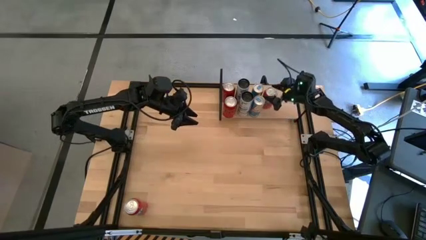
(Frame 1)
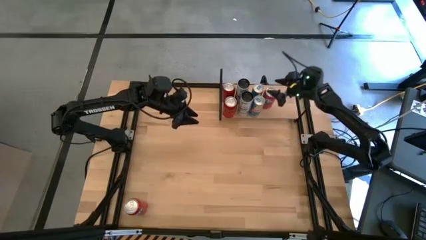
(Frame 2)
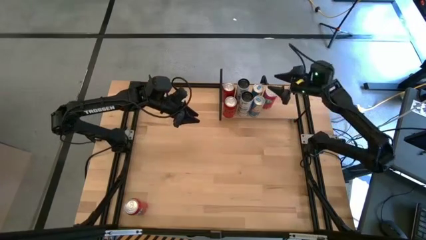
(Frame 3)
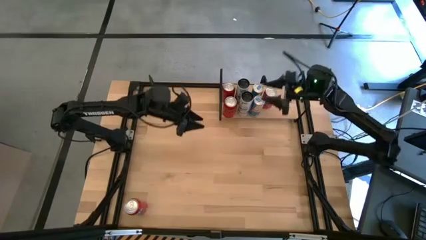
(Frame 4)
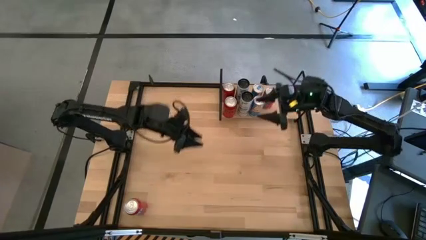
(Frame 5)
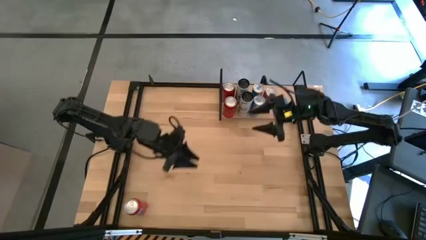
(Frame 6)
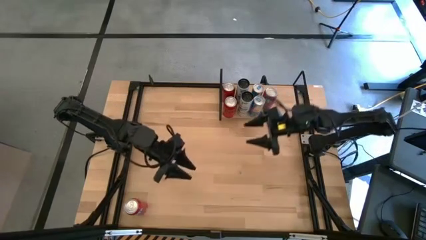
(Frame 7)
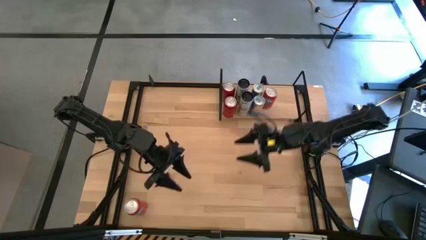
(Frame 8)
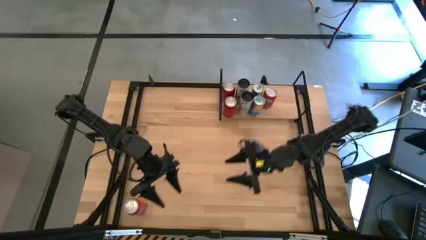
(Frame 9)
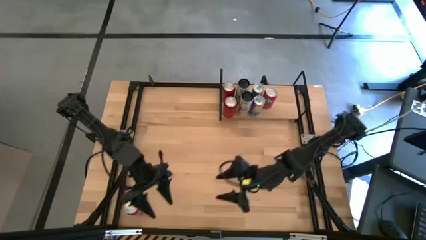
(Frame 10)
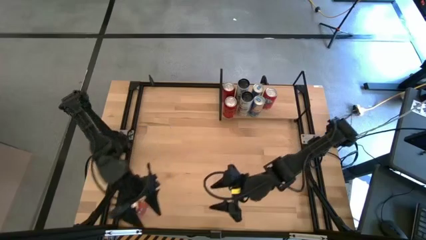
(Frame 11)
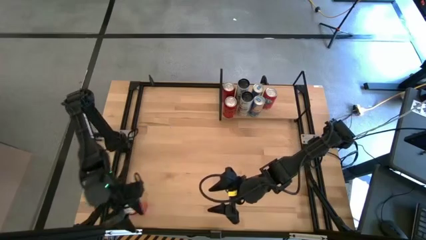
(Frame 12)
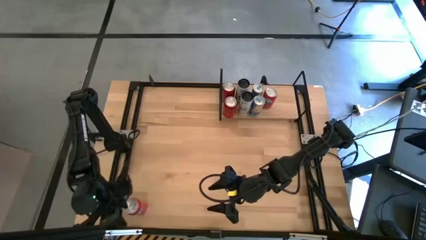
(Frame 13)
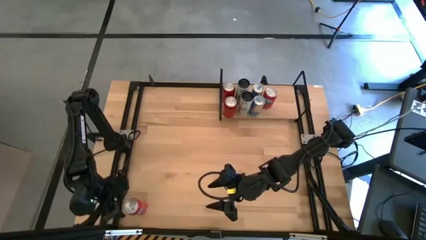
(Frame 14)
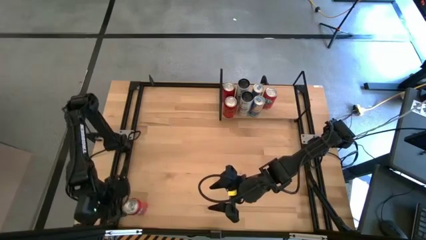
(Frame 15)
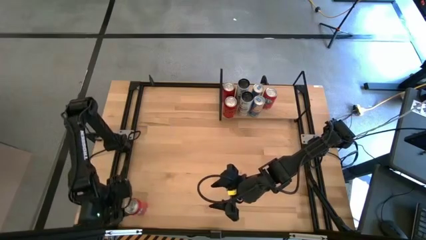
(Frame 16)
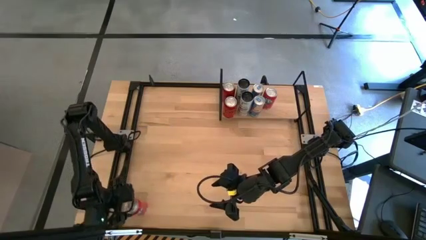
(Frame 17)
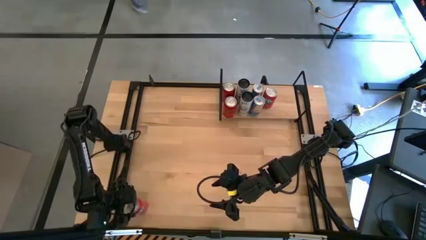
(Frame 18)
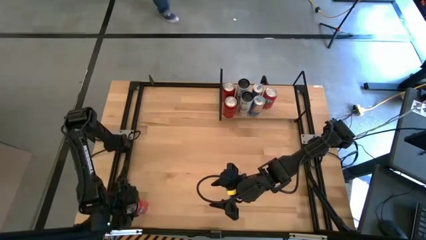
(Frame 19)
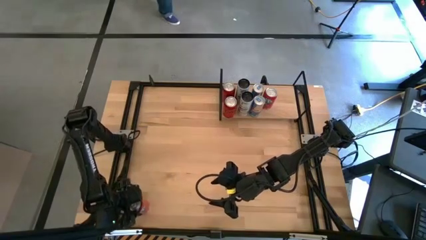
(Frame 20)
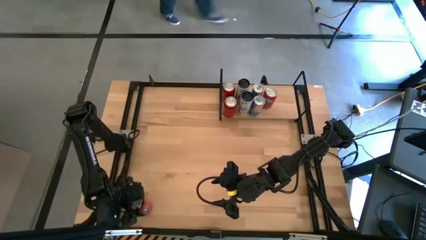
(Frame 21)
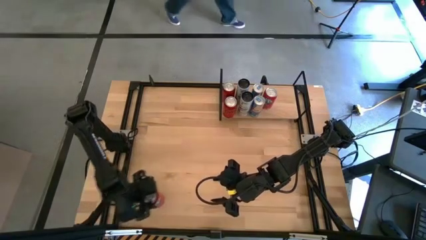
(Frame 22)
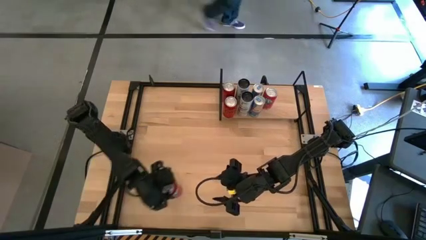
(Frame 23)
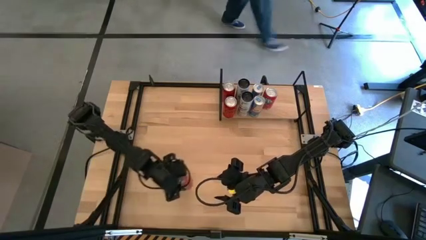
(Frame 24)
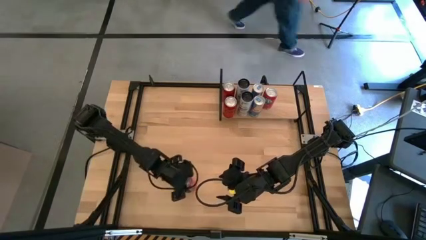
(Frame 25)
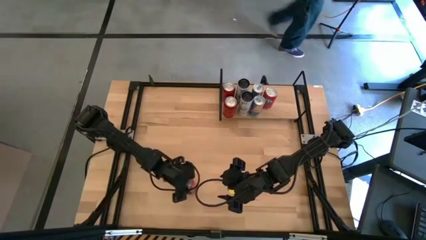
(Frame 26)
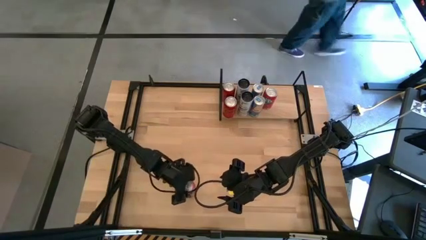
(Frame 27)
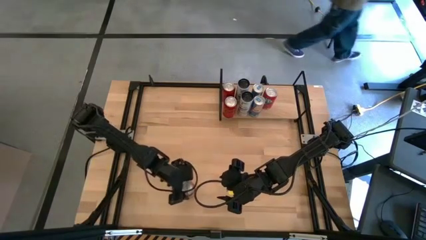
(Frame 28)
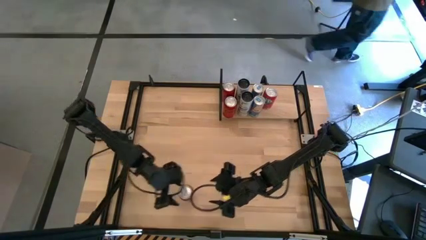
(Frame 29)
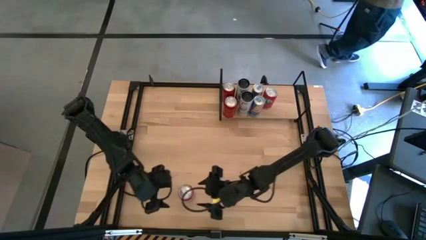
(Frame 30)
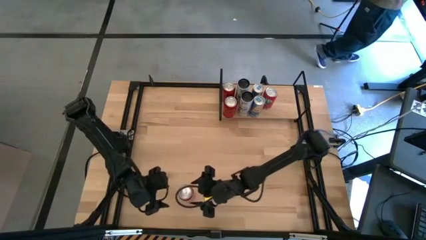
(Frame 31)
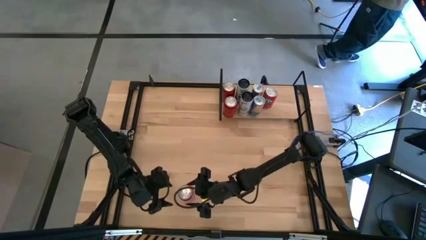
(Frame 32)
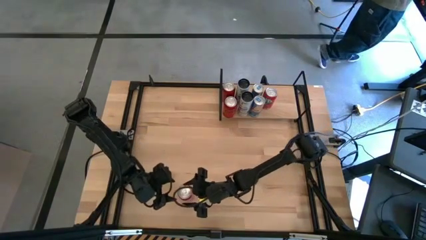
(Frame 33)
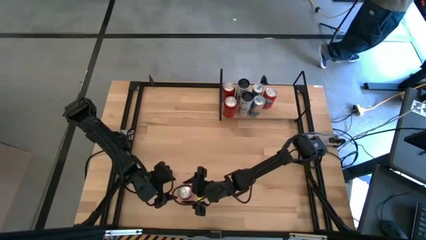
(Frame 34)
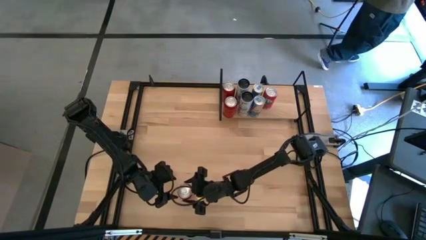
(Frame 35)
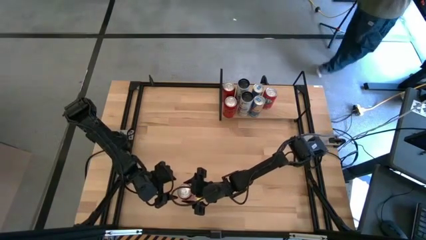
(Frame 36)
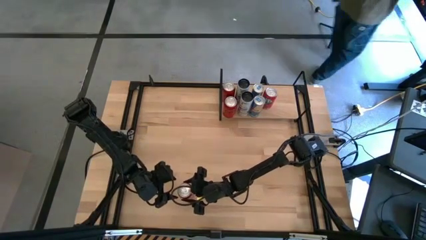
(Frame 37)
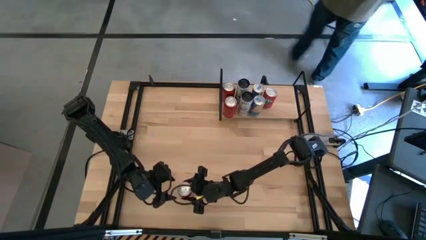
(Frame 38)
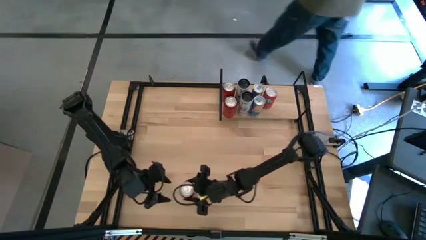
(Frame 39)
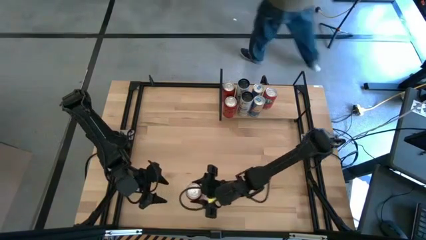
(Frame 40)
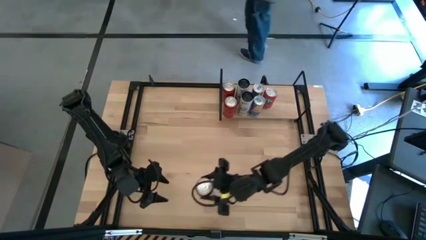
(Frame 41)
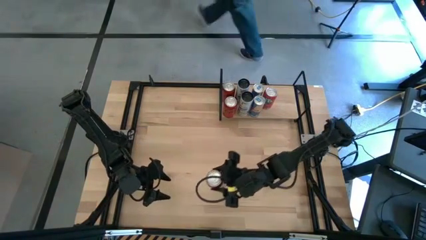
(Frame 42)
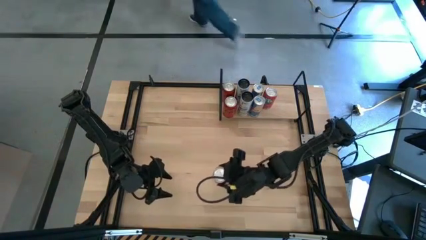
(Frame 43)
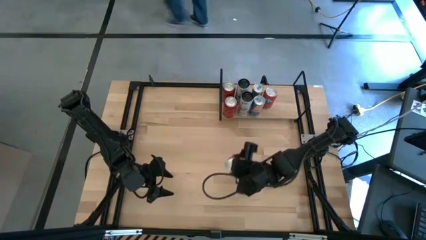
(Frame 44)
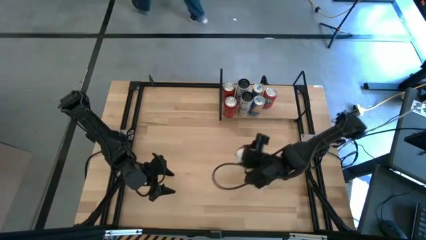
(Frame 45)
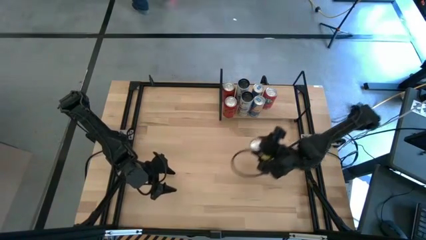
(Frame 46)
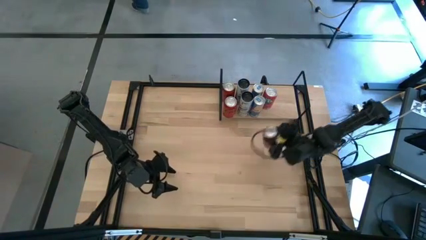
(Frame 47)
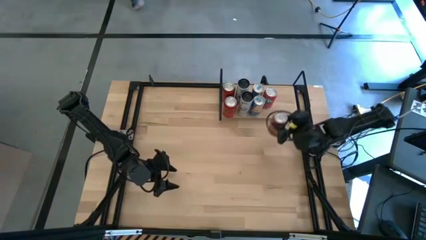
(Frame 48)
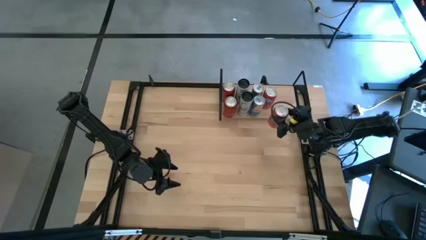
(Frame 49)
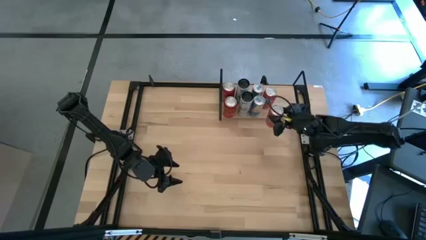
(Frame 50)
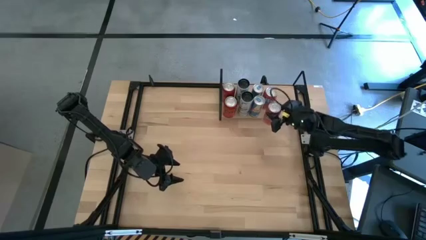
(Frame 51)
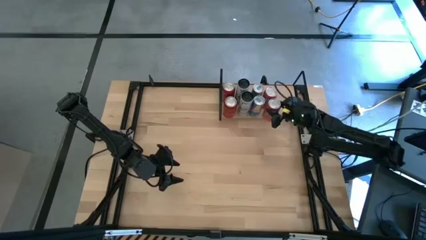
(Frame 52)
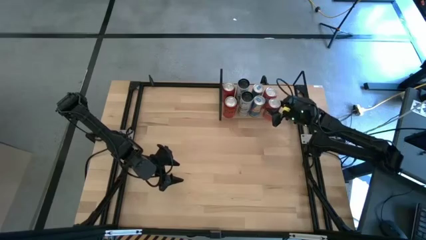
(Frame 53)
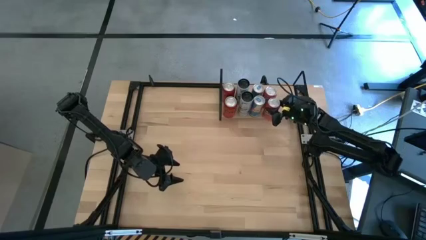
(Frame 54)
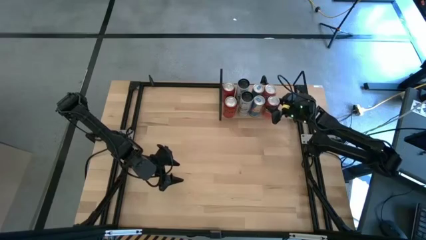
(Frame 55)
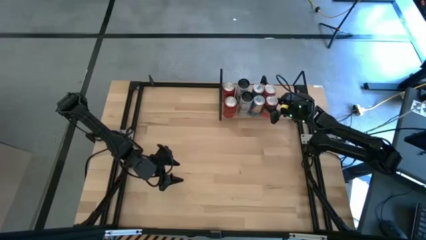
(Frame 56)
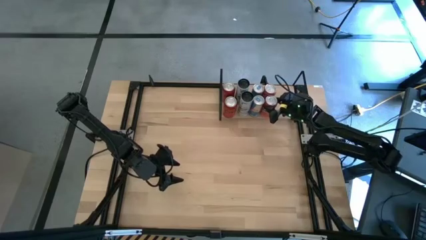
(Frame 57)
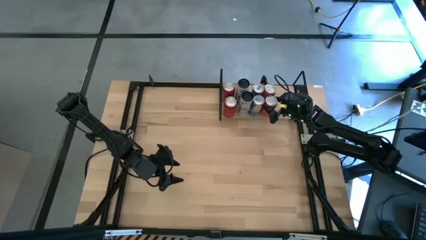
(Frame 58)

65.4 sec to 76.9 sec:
Task: Place canned beverage on shelf
Put the orange soda can on the shelf aligned with other red soda can

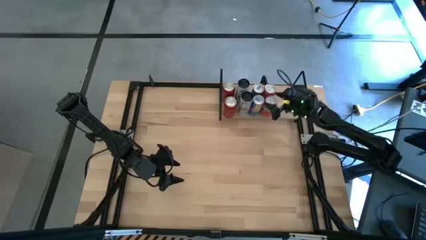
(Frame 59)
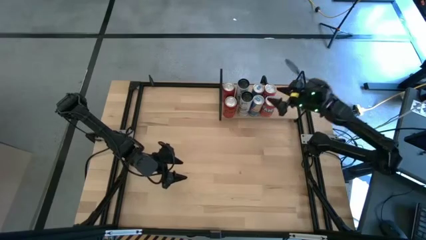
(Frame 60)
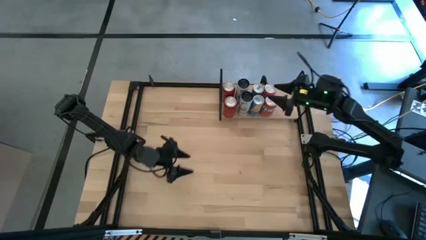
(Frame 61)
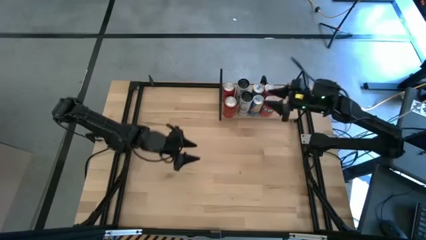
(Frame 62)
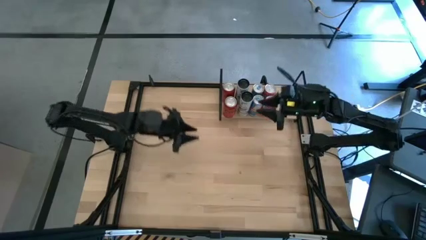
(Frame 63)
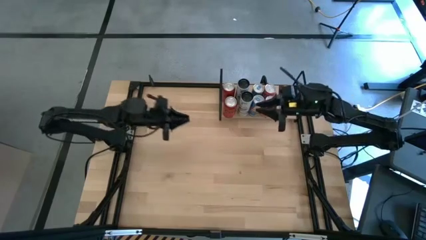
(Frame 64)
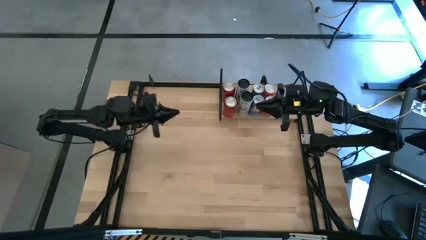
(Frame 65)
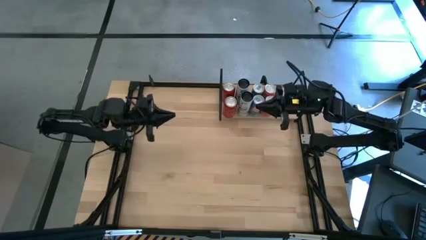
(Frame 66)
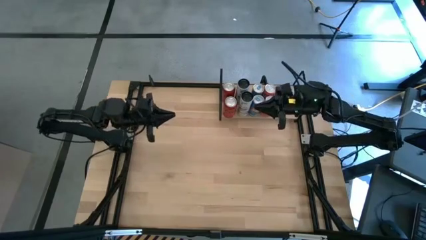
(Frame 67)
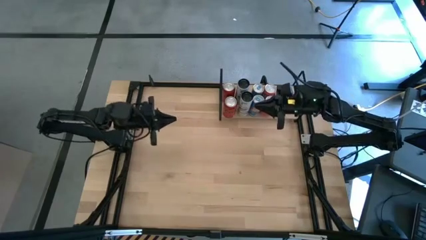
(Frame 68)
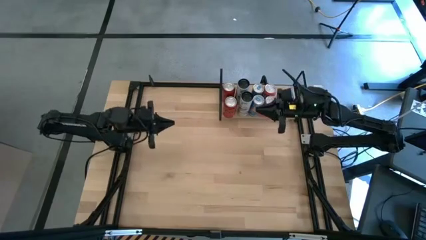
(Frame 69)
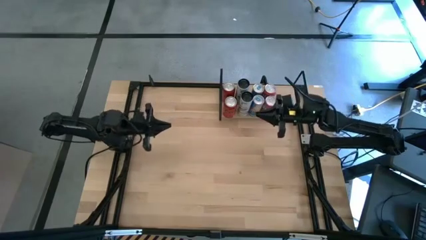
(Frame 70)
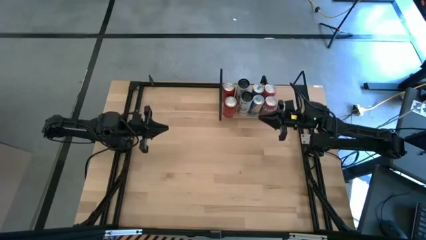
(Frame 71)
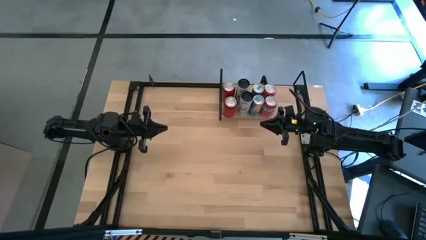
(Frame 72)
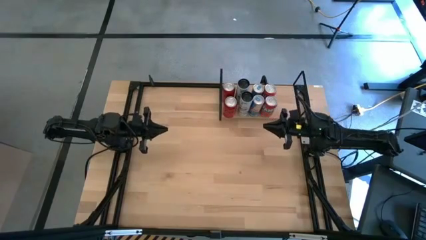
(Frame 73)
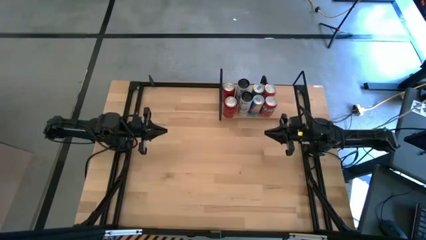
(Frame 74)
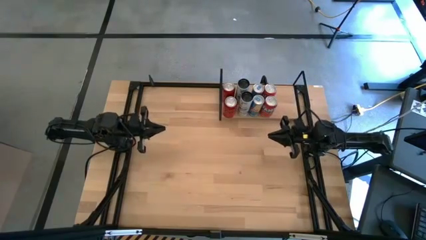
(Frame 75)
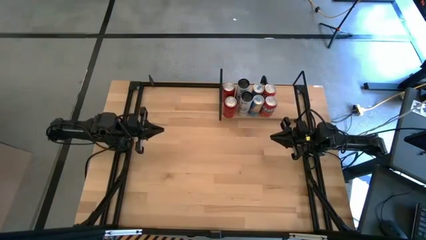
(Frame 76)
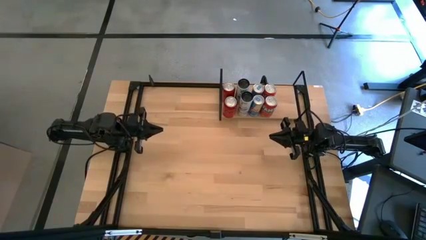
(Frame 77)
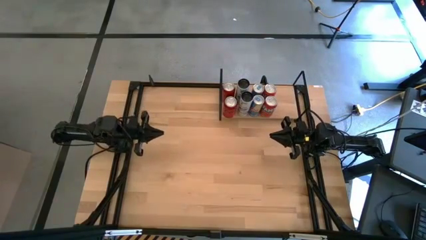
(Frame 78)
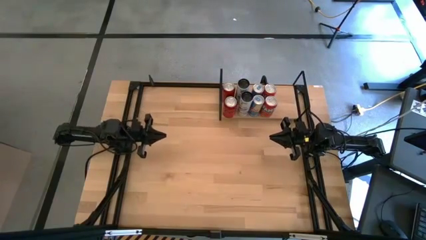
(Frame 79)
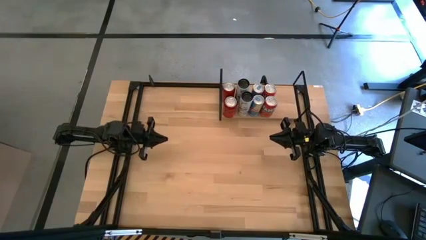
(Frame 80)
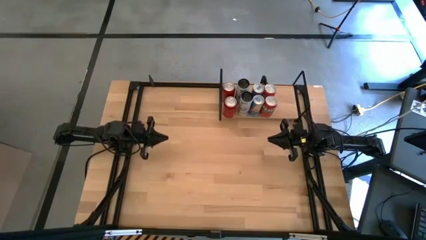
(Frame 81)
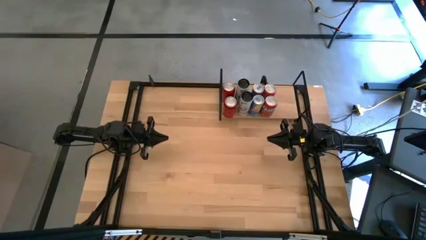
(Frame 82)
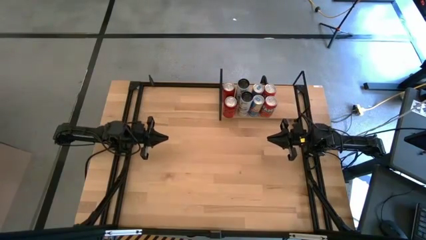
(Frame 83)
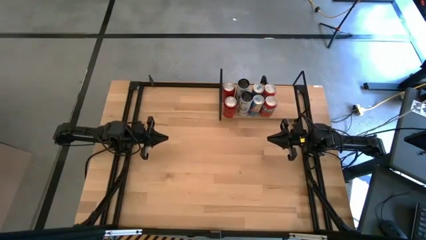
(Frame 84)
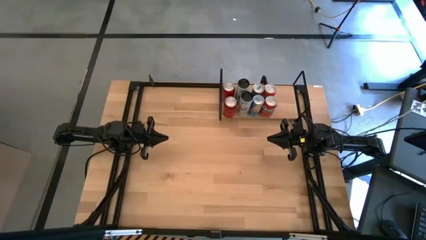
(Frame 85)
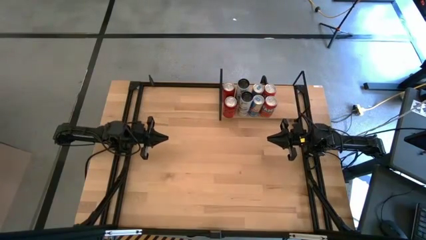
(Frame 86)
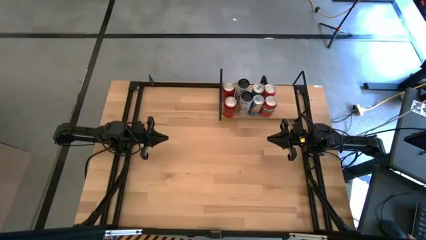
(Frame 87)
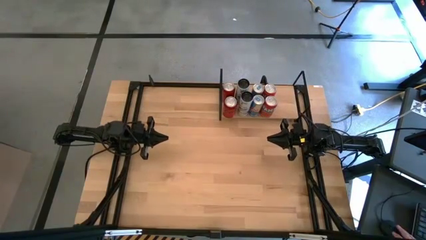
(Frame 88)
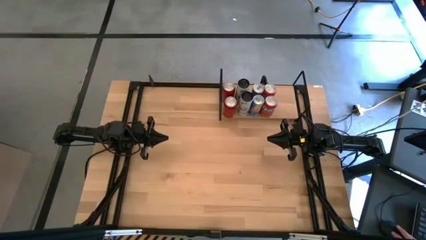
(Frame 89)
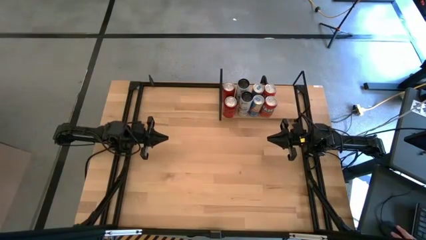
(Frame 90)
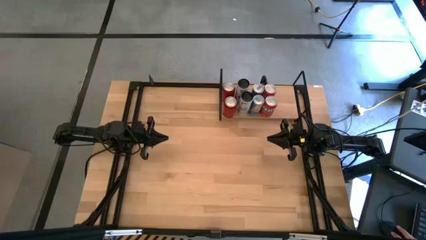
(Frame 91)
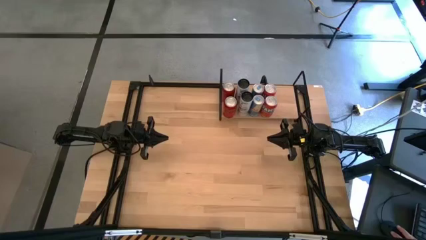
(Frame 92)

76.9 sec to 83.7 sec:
Return to Home Position
